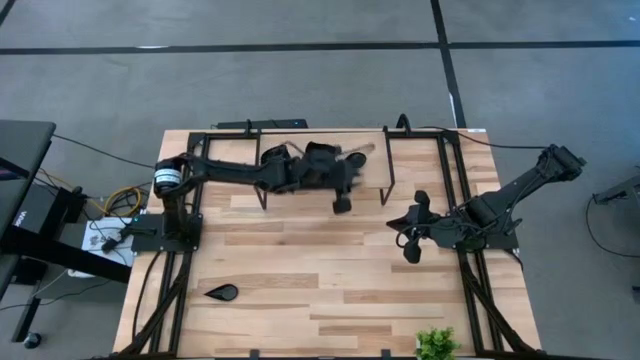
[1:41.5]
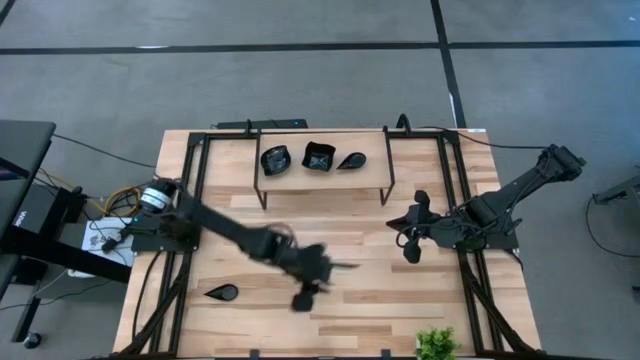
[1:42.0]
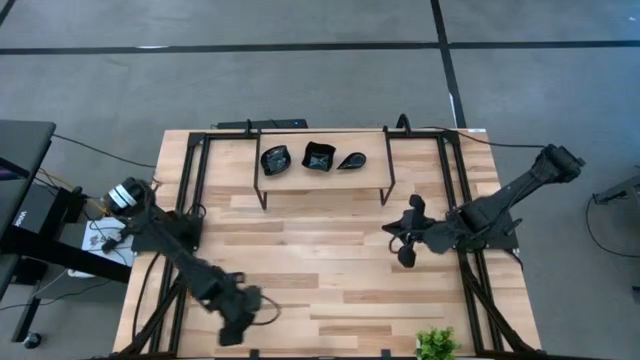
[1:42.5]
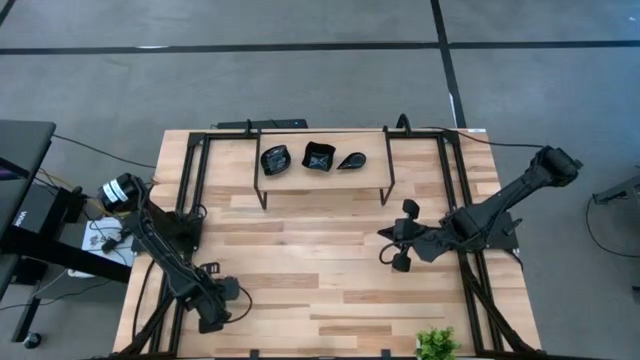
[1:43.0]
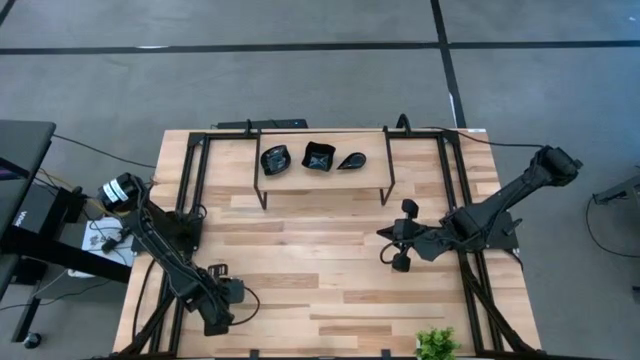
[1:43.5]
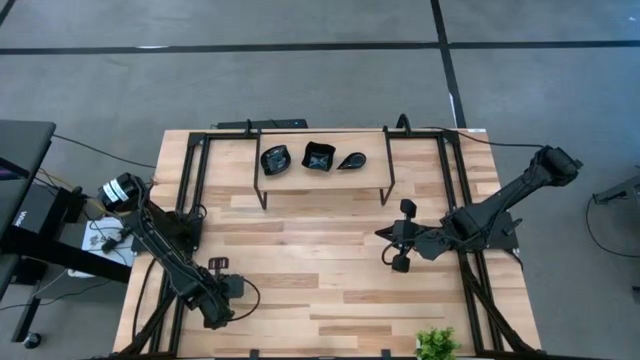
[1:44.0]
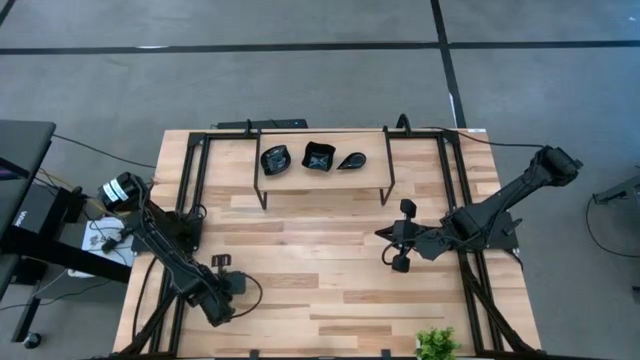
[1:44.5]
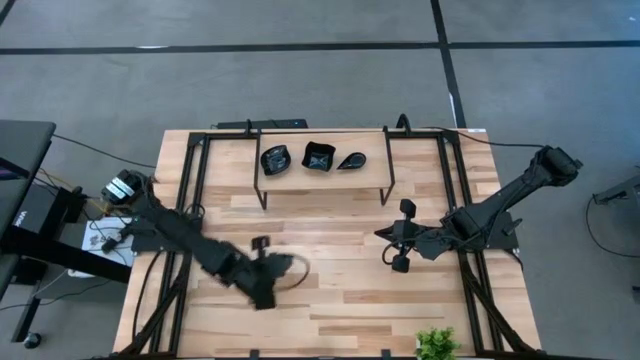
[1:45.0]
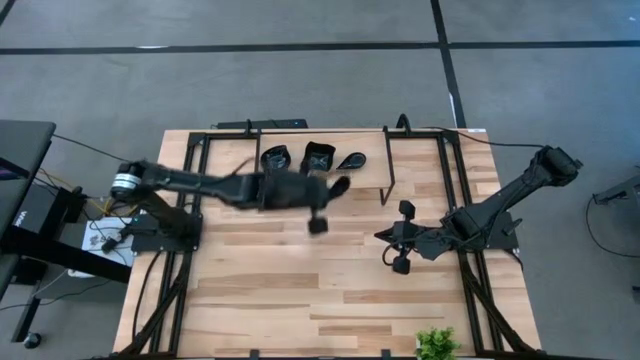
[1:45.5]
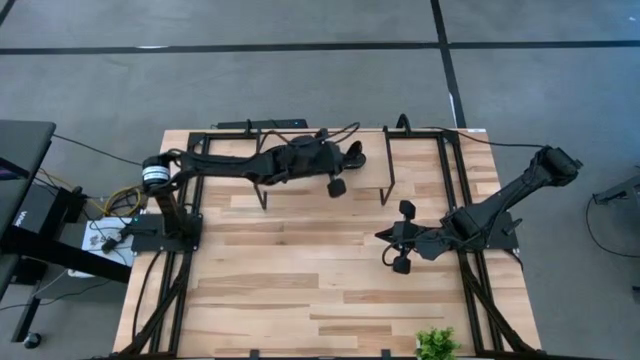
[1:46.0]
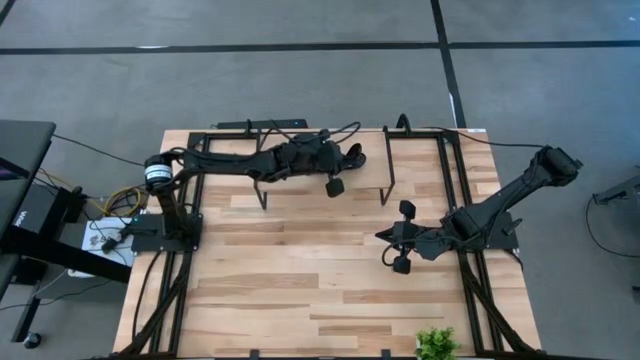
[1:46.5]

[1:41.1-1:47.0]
Task: Pick & Place Mini shaped plates
Stack the black drop-shaped plate on top of the black drop-shaped plate on the shelf

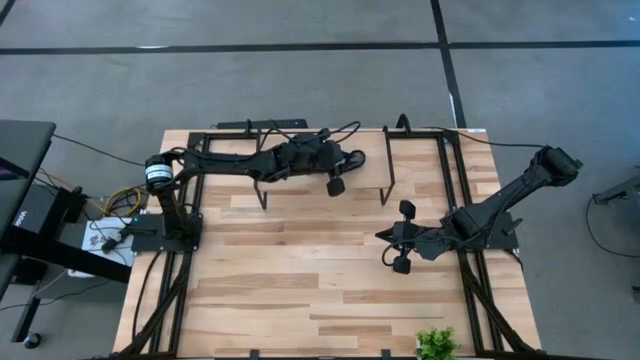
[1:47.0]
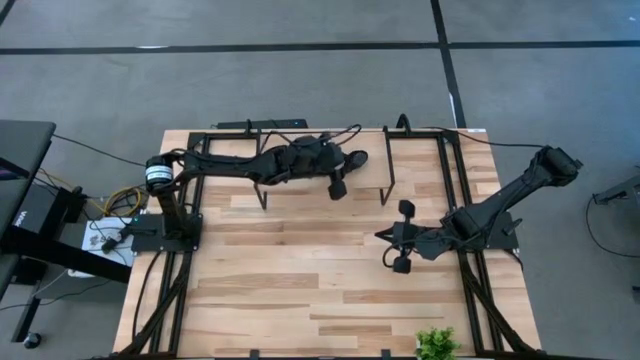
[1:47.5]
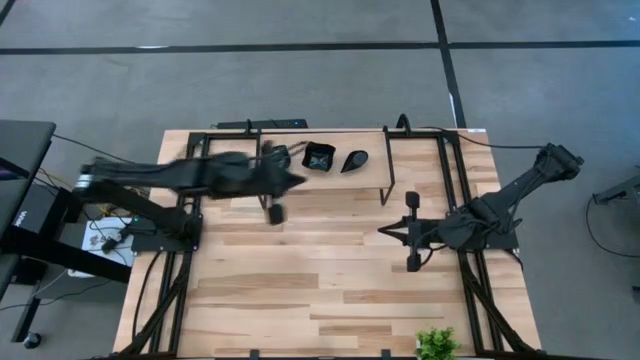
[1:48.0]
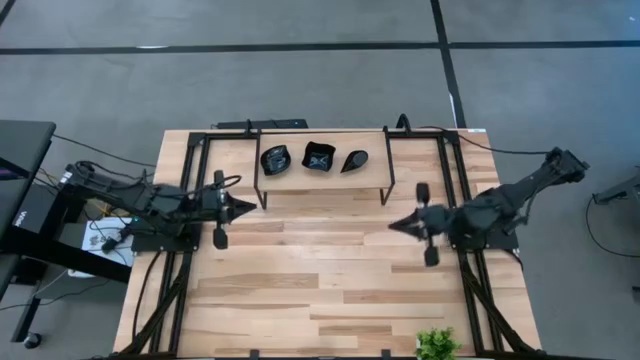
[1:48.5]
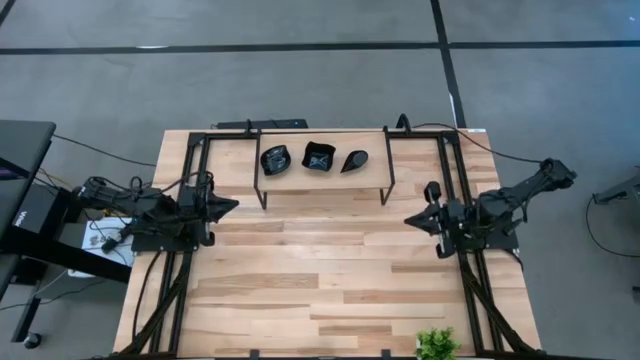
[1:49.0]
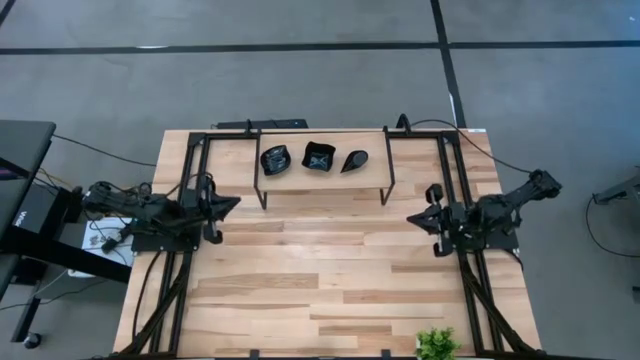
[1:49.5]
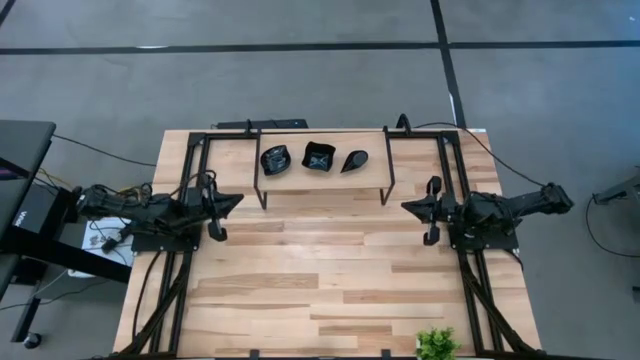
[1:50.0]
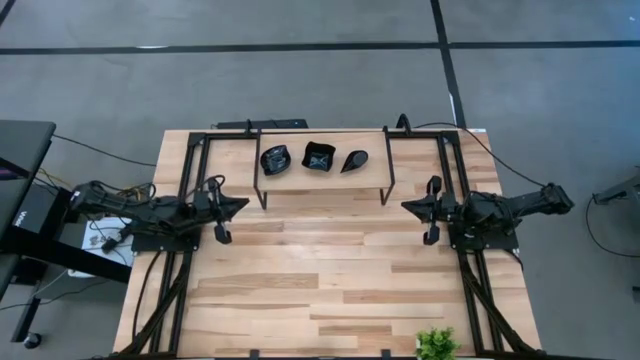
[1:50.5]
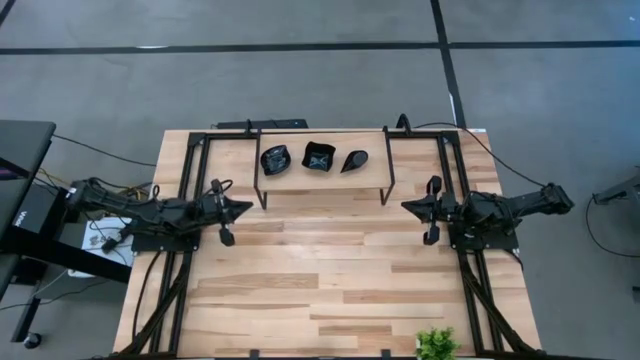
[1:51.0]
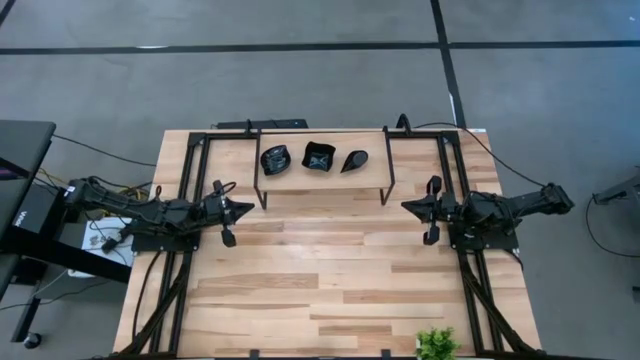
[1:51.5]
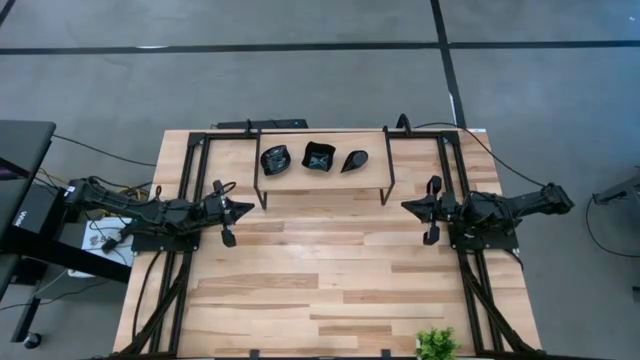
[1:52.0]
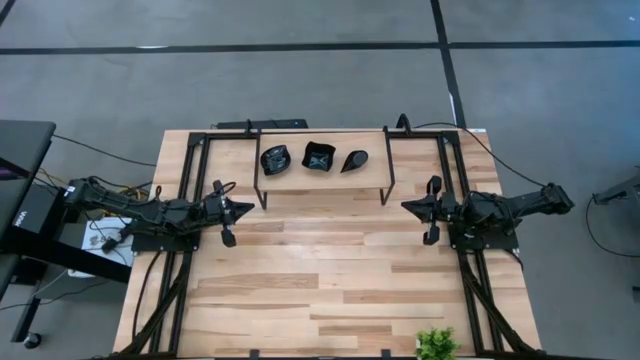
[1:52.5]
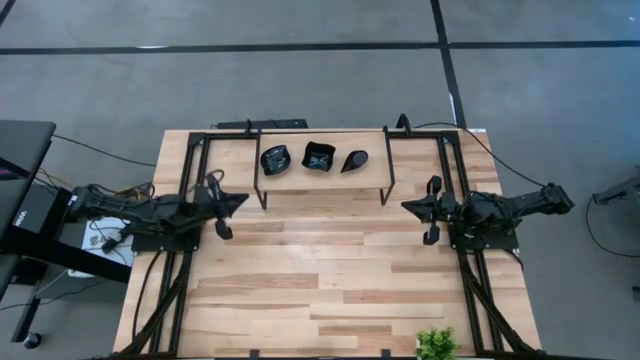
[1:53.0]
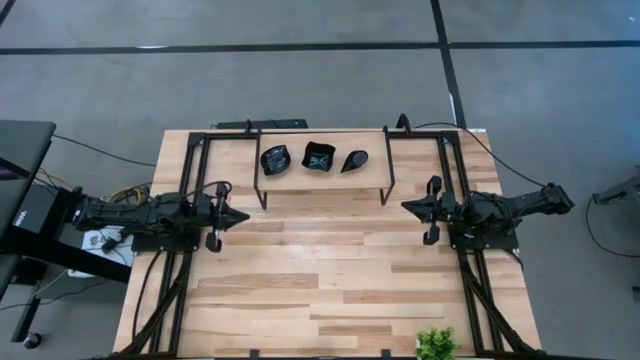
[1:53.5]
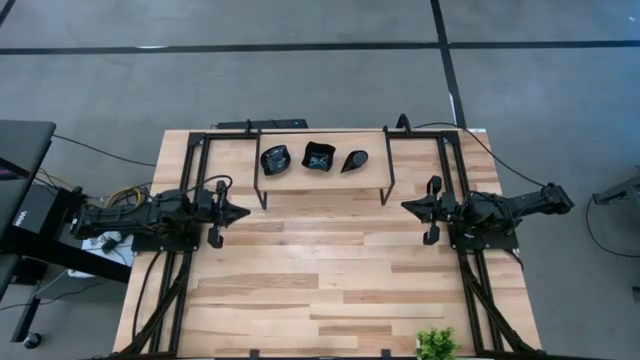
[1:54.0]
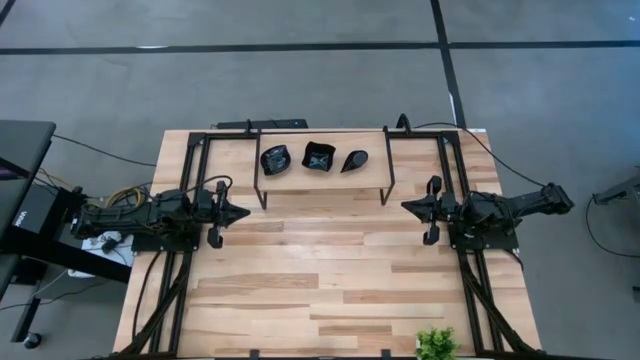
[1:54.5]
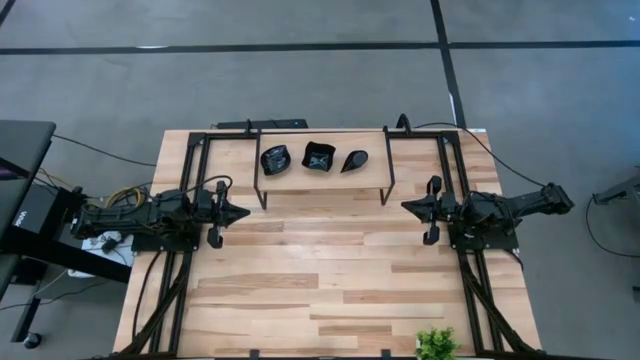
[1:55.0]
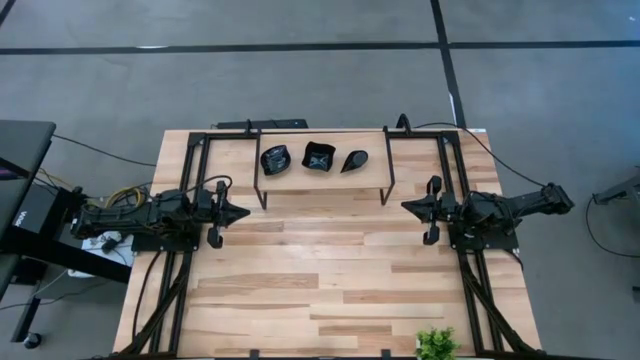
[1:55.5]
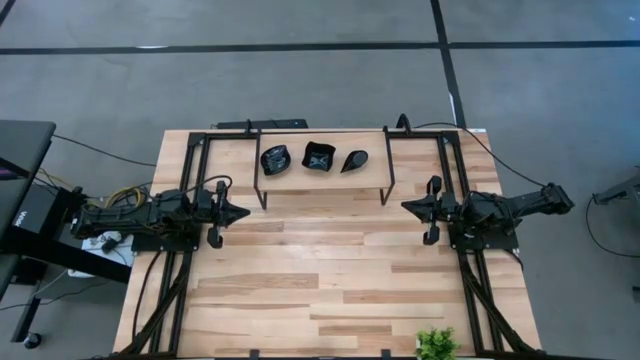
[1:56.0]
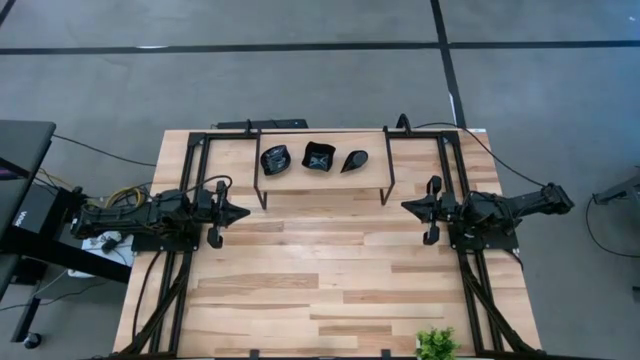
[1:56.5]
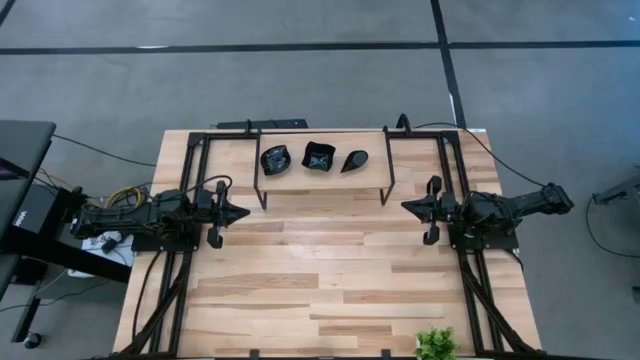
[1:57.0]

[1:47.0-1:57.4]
Return to Home Position

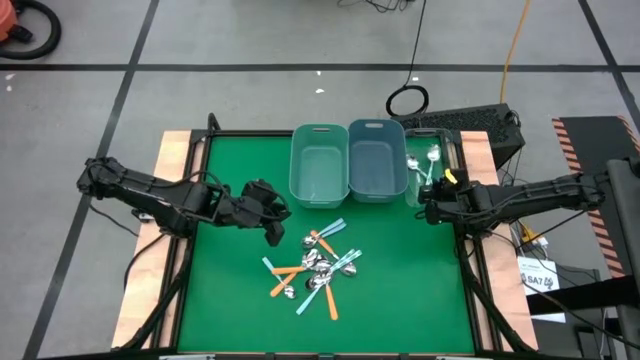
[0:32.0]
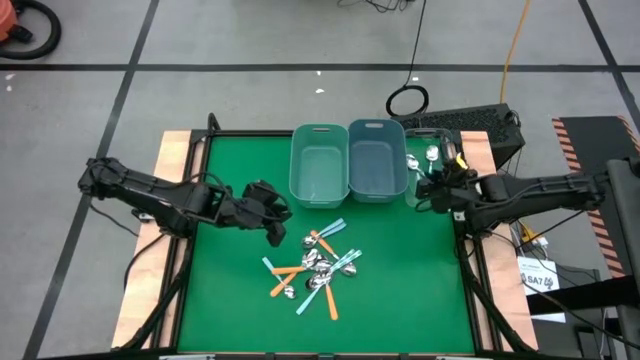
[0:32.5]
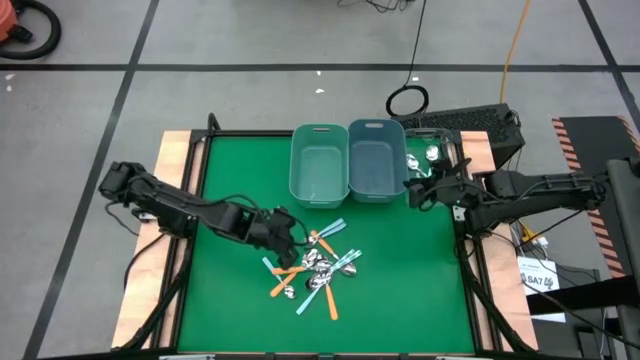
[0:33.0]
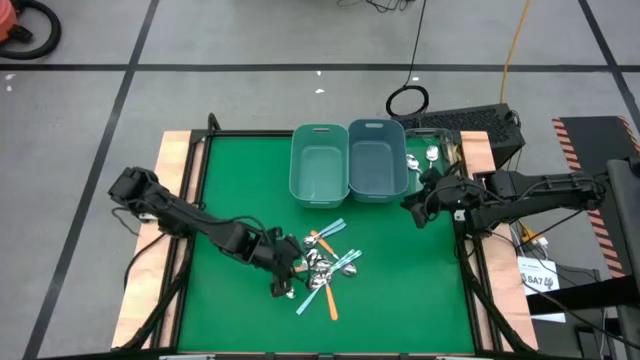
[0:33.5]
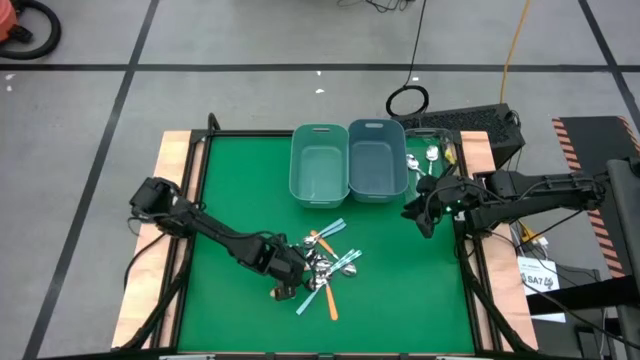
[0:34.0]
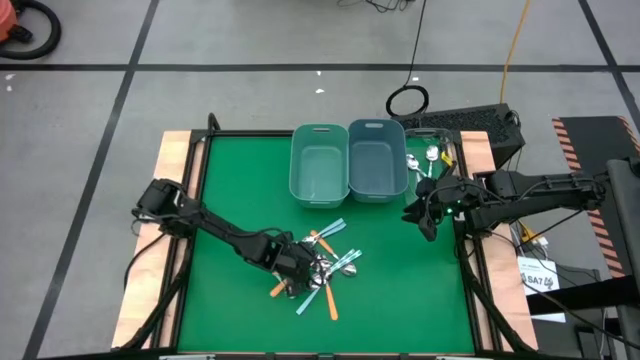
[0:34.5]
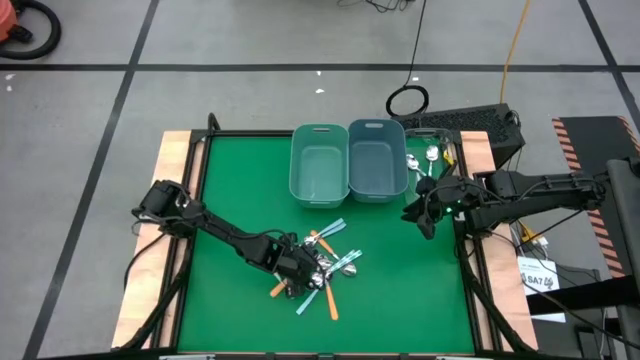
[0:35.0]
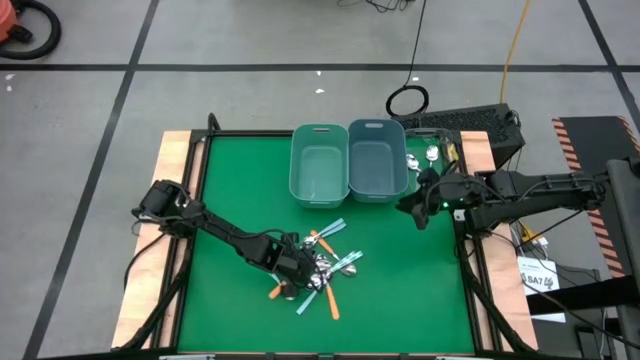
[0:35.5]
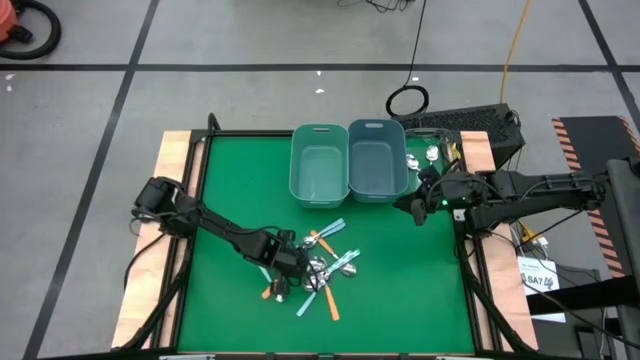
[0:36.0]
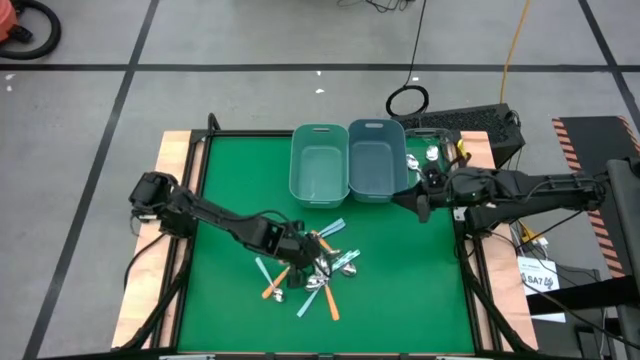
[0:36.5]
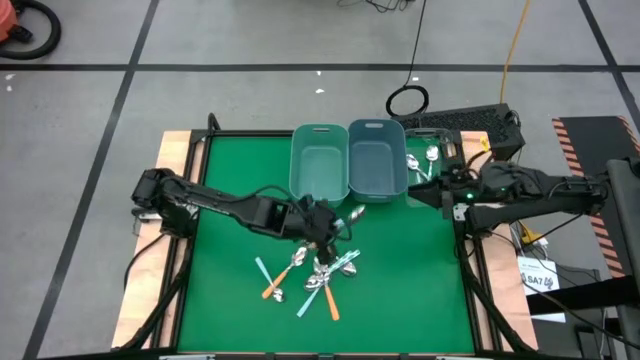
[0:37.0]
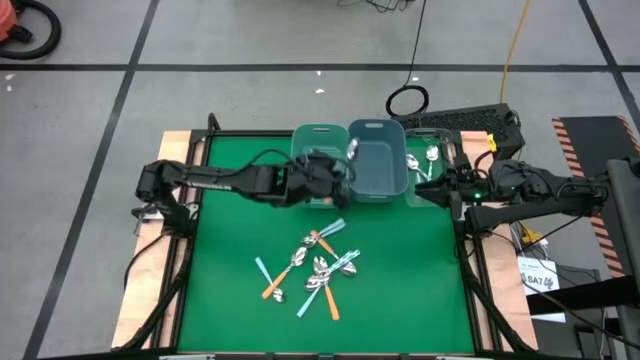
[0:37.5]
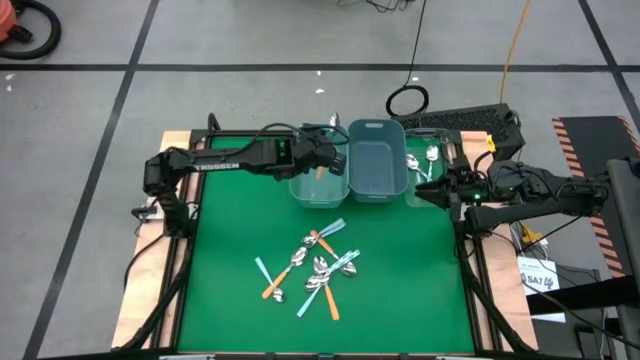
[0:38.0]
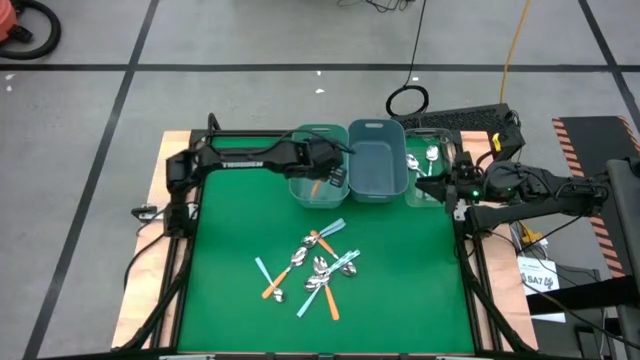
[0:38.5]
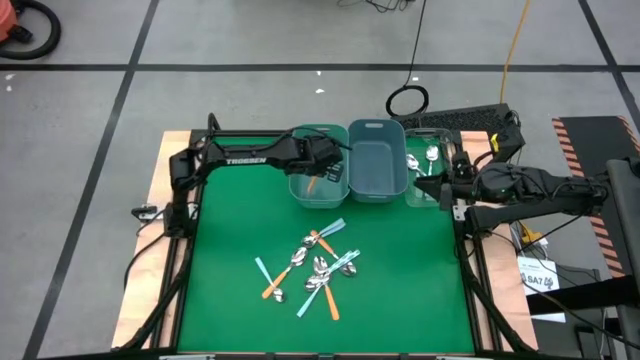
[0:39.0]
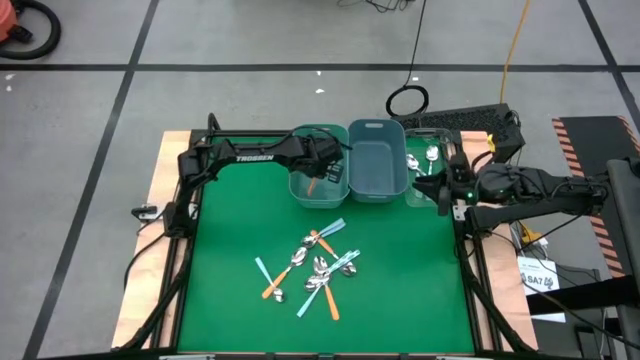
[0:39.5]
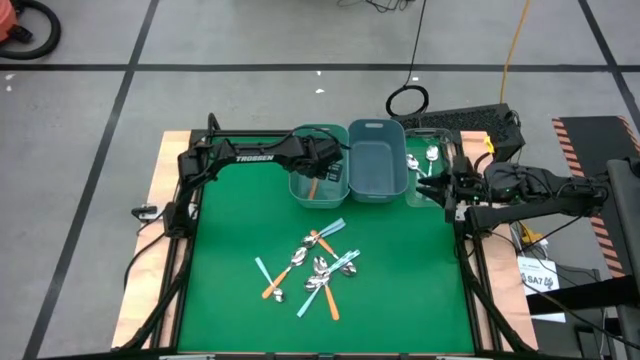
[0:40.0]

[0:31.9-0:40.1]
Task: Sort silverware by color (type)
Put the yellow spoon into the green bin
